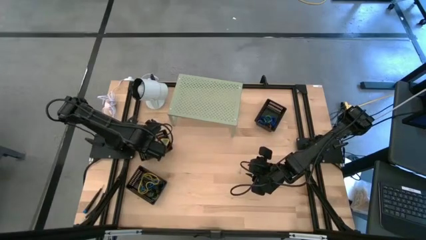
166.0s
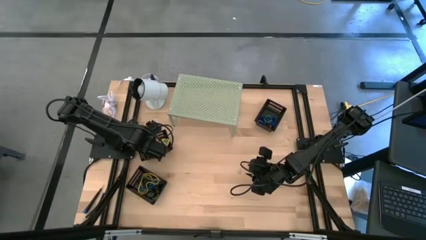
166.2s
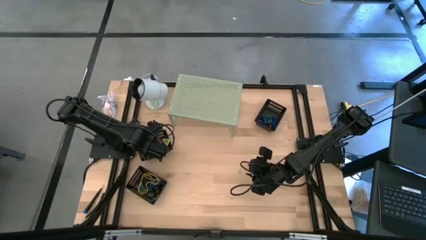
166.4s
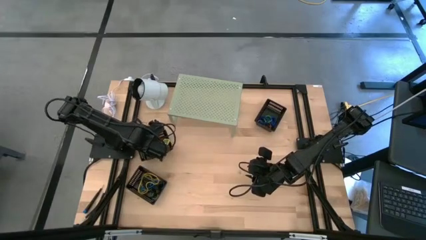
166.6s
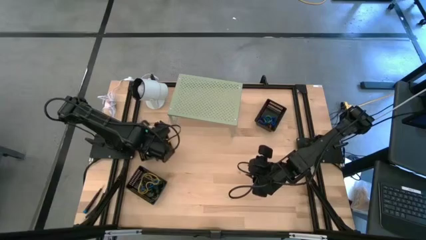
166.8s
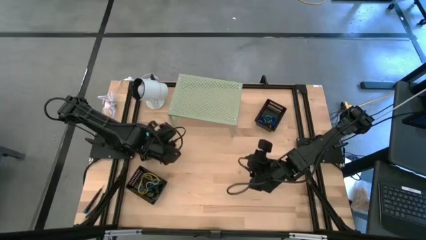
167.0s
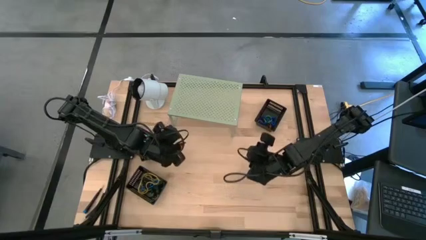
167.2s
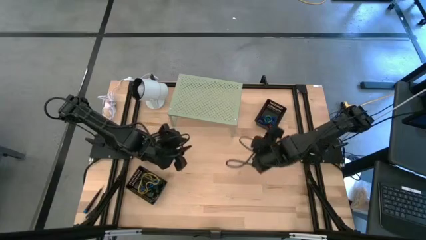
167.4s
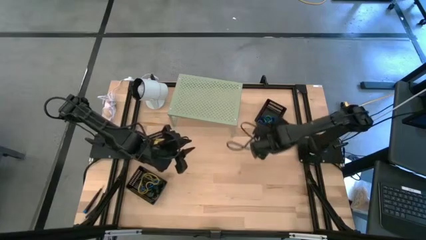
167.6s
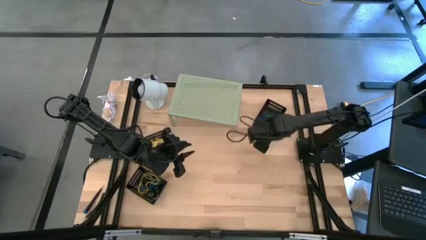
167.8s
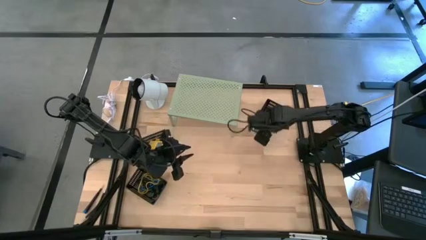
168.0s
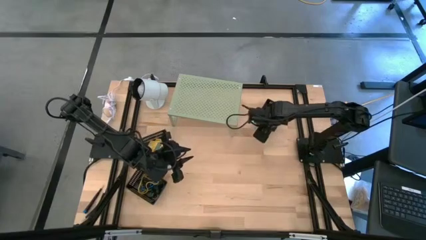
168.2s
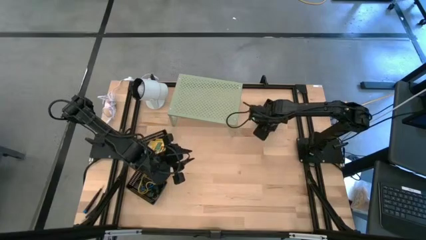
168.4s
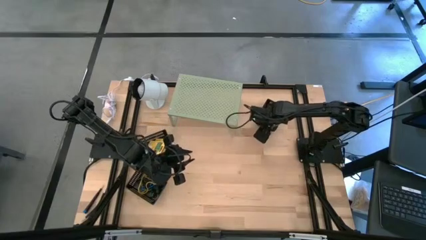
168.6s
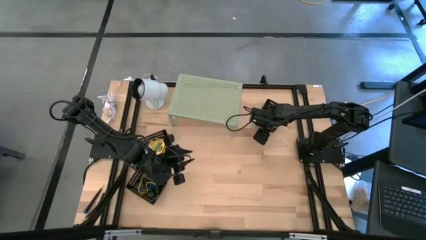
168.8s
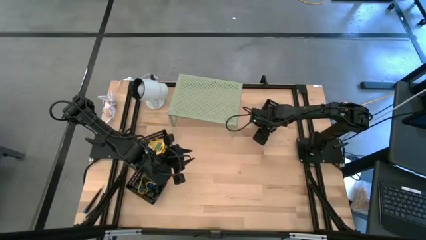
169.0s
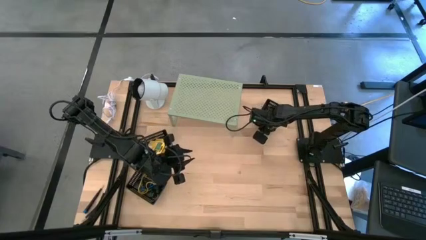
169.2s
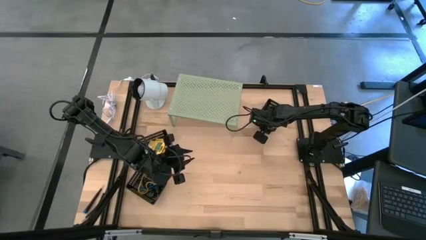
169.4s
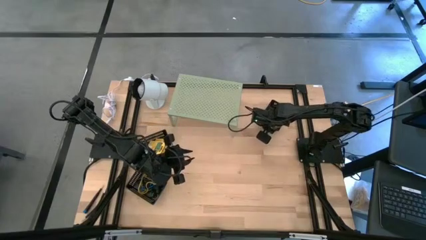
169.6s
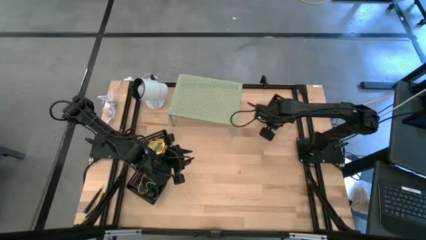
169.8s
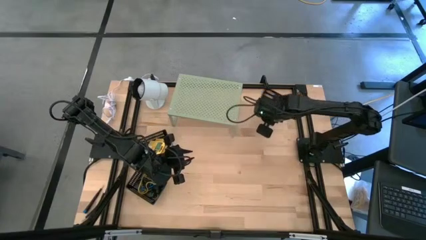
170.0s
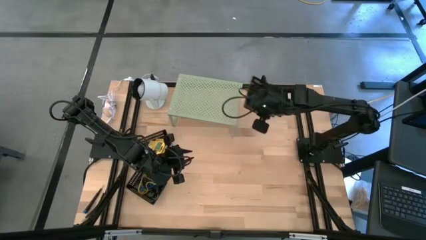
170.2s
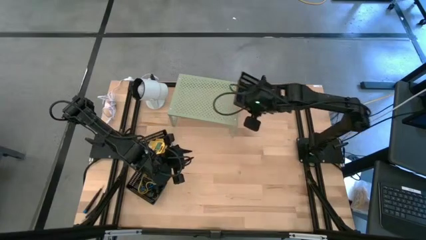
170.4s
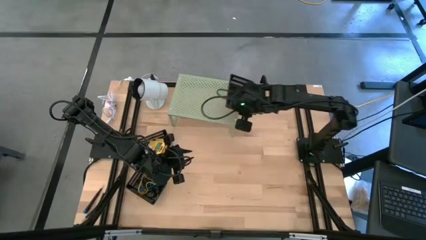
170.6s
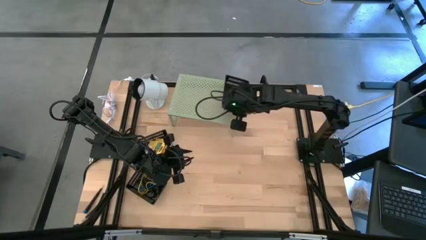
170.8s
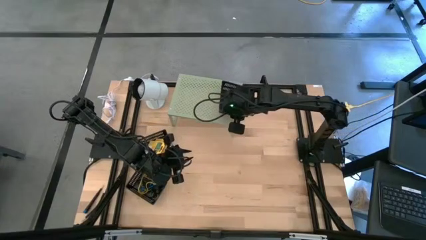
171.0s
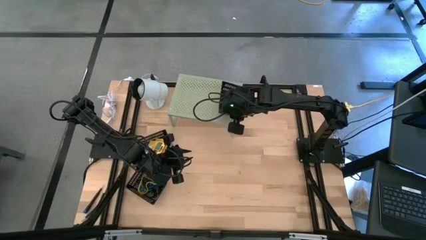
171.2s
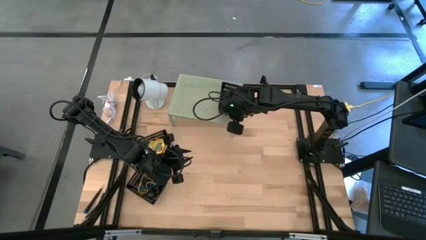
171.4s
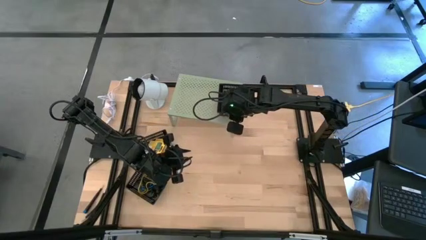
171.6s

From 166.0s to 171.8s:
Task: Pick & Place Office Desk Supplies
Put the top right black bin on the shelf

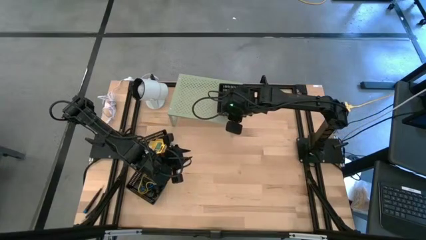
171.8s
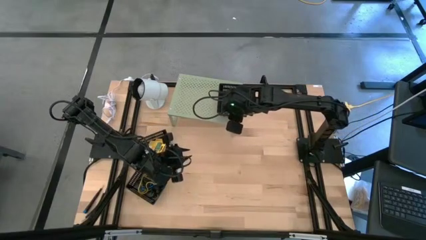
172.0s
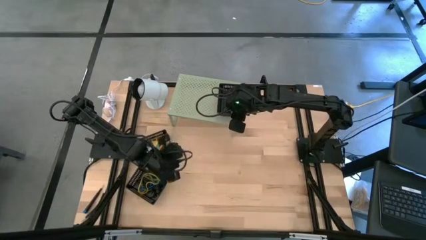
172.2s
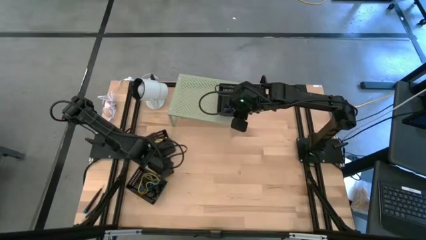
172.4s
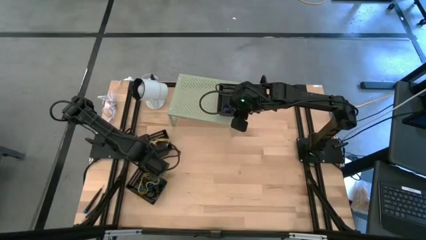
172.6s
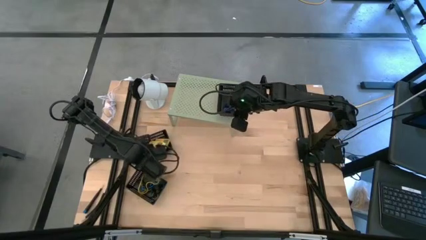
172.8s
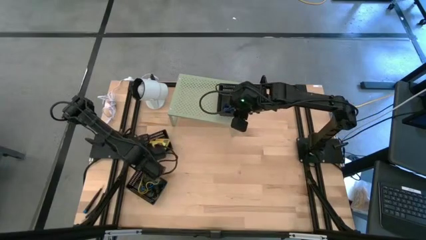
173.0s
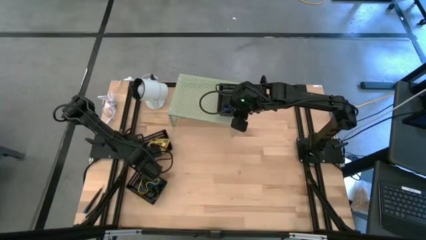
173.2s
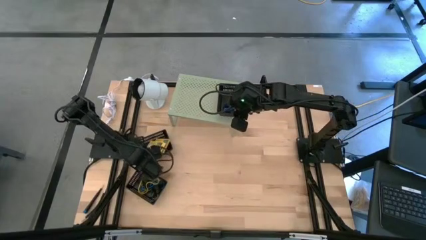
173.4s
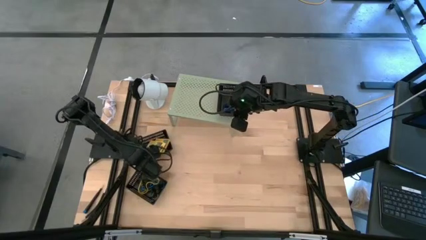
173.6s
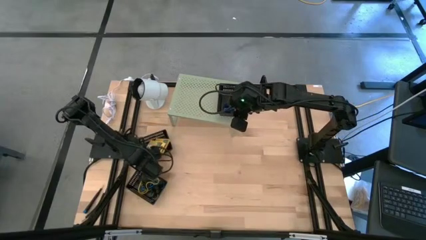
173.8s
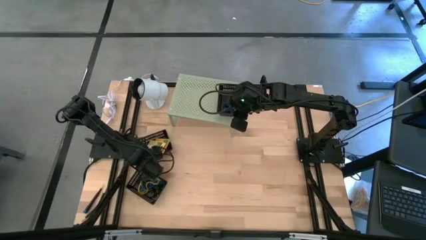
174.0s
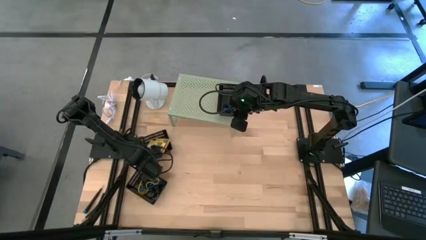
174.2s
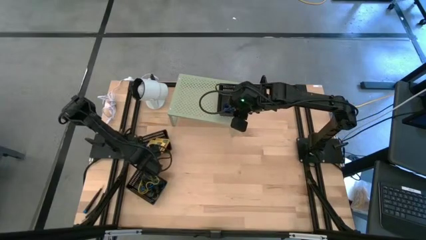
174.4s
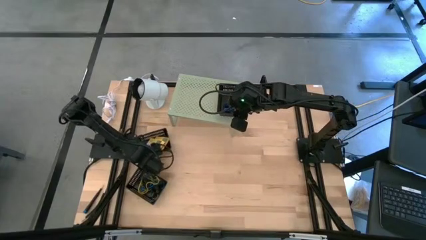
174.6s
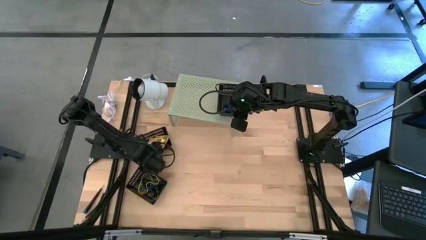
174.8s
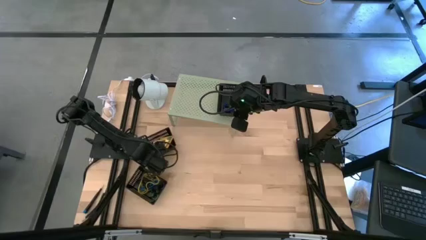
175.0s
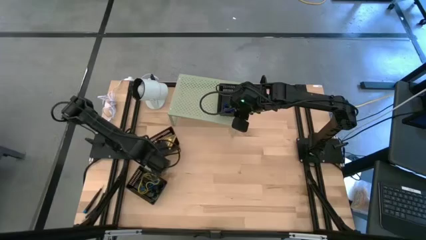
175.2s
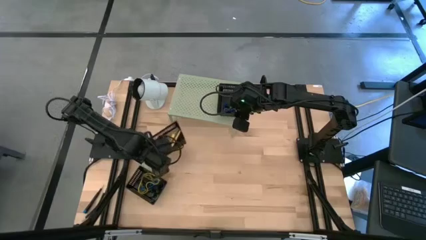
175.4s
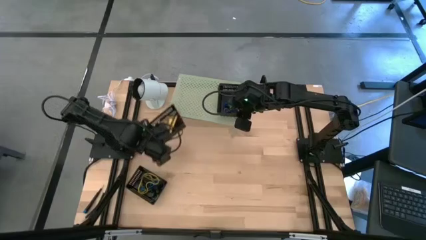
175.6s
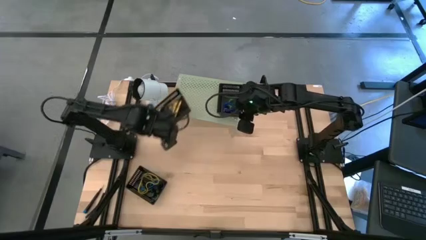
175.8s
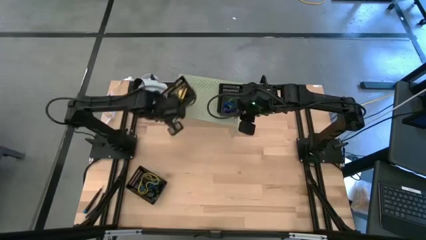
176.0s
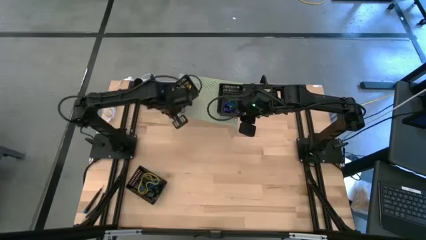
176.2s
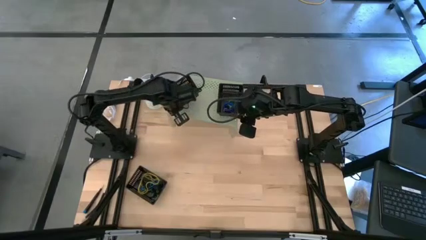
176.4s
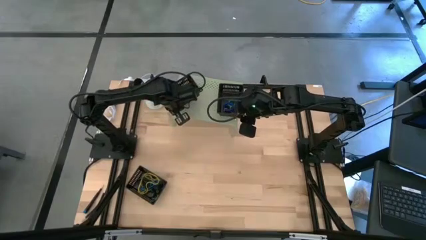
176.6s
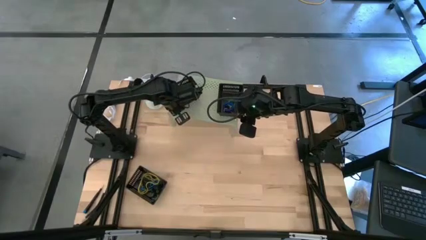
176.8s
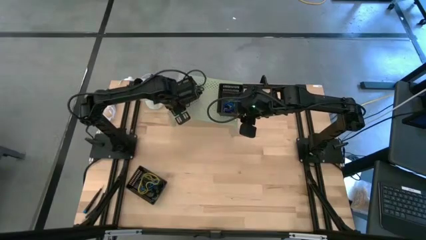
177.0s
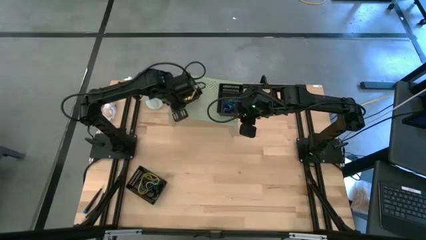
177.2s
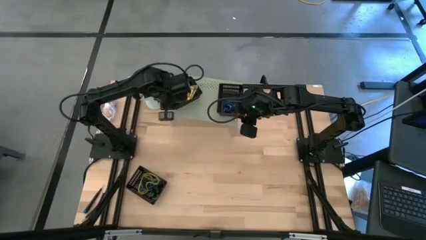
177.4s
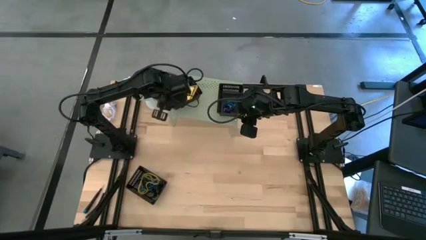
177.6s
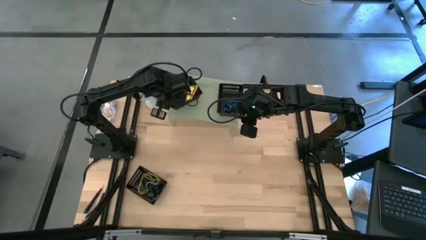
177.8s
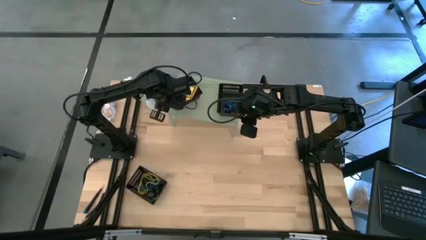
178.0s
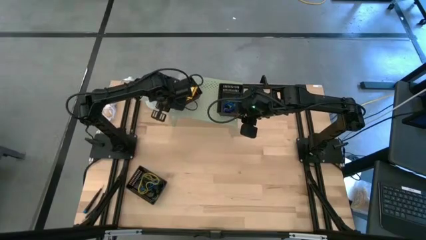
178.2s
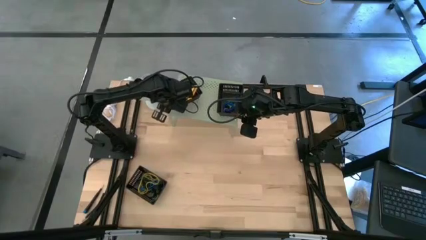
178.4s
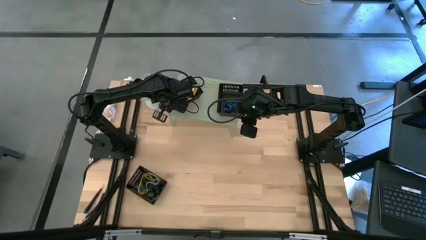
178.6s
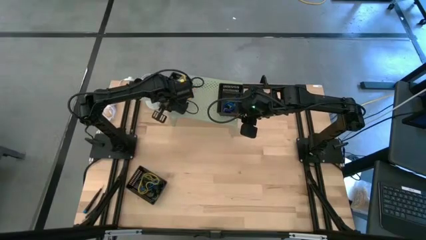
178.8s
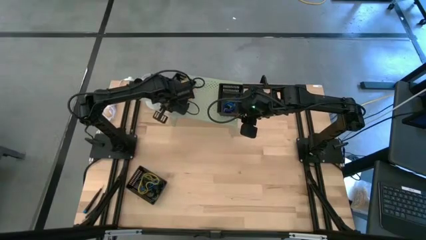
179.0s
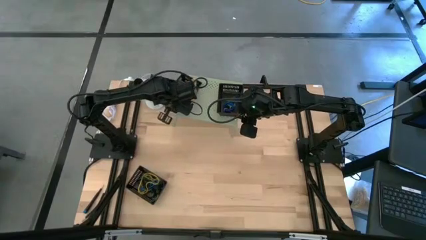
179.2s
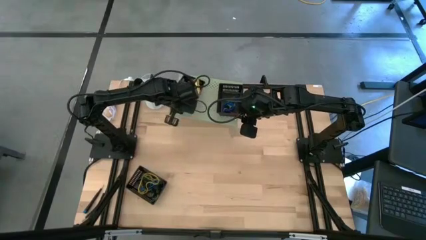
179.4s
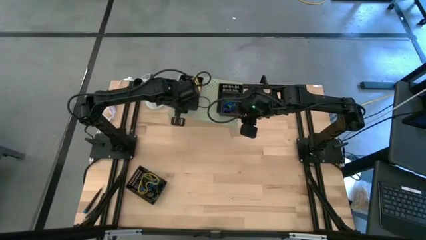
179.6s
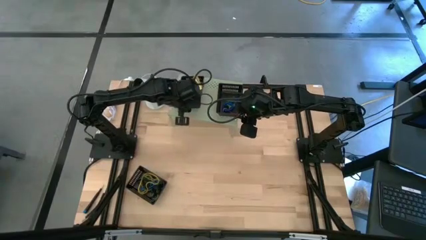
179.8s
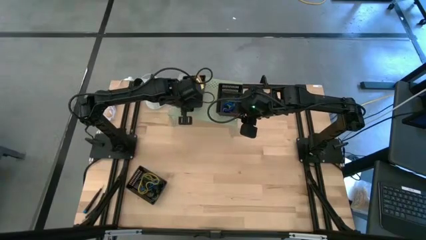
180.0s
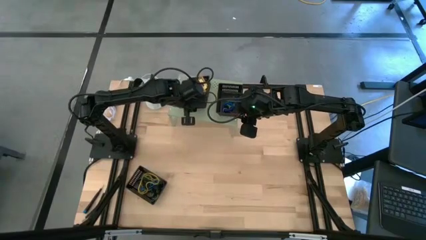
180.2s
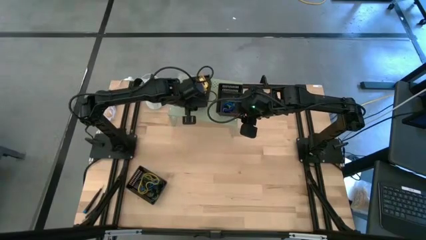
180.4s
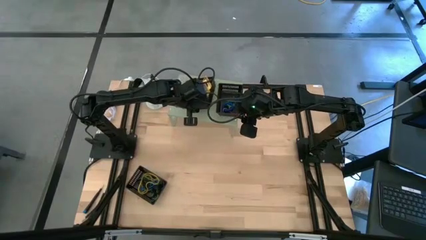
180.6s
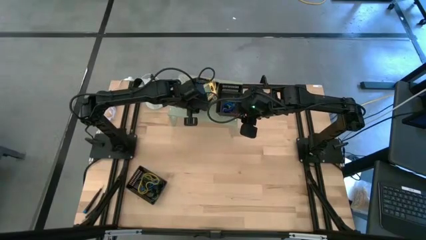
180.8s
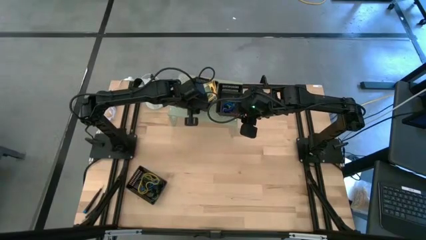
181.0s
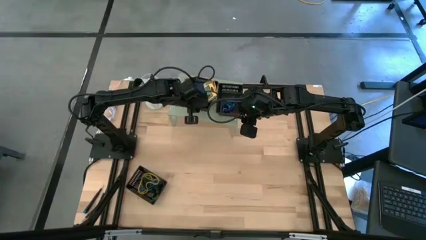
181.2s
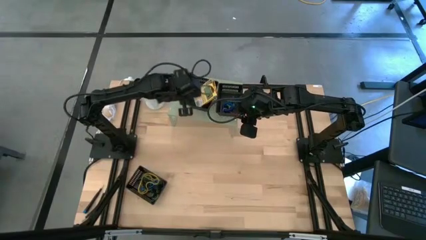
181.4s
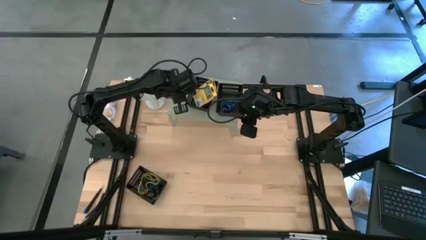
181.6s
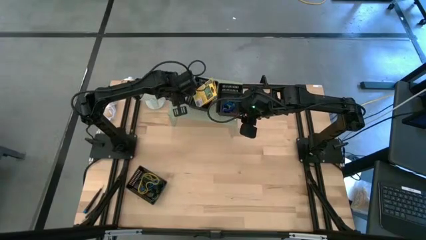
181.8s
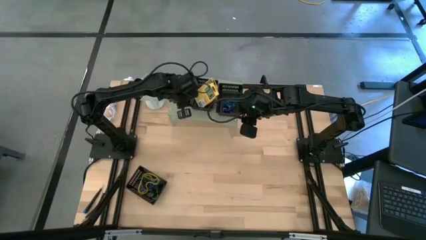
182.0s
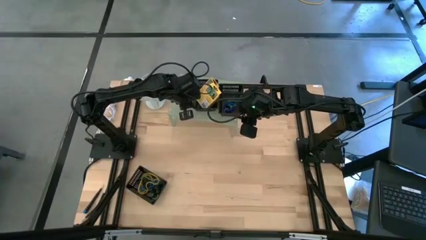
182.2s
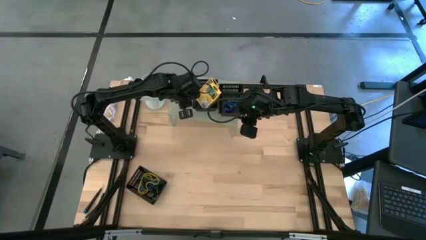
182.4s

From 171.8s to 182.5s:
Put the top black bin on the shelf
